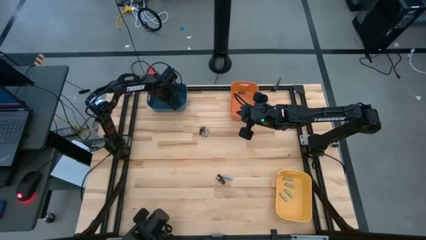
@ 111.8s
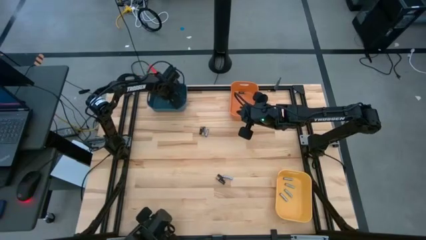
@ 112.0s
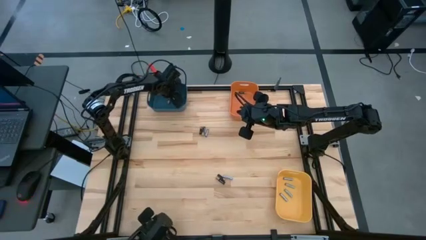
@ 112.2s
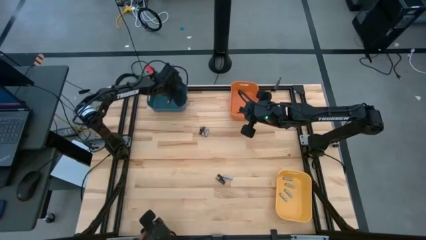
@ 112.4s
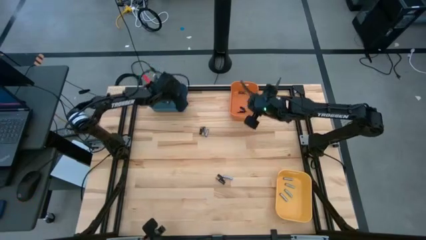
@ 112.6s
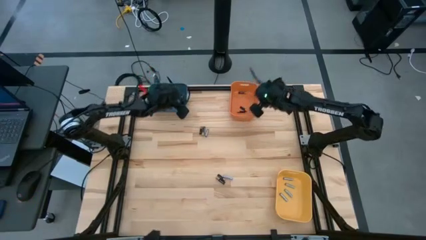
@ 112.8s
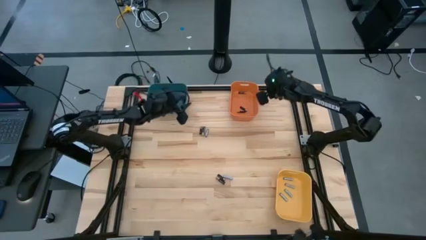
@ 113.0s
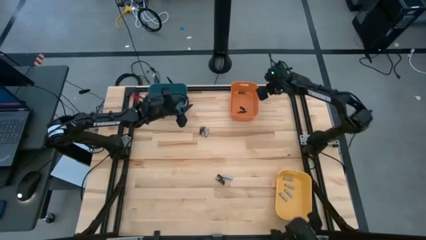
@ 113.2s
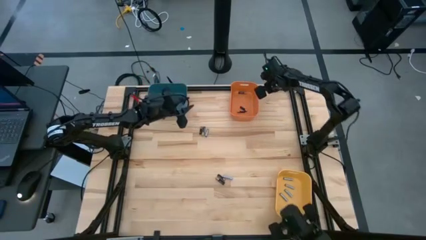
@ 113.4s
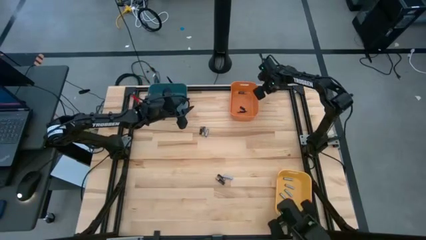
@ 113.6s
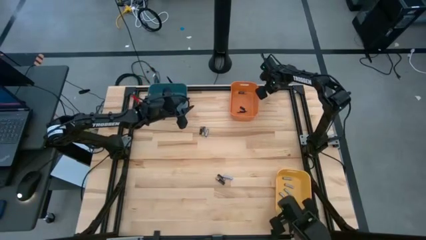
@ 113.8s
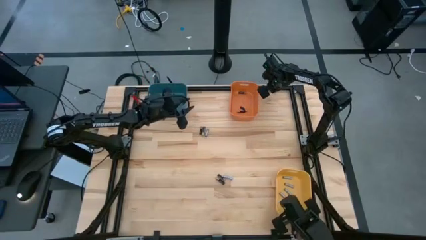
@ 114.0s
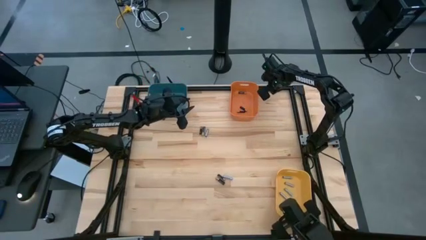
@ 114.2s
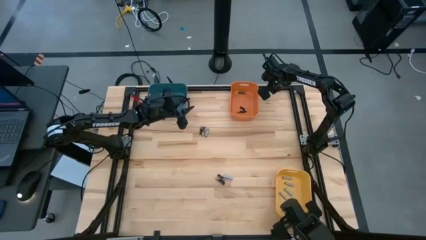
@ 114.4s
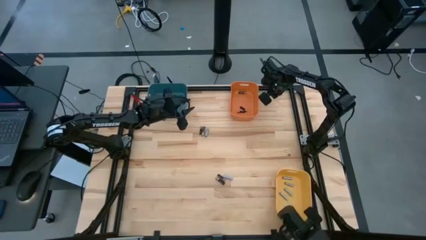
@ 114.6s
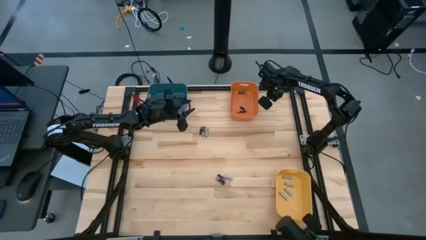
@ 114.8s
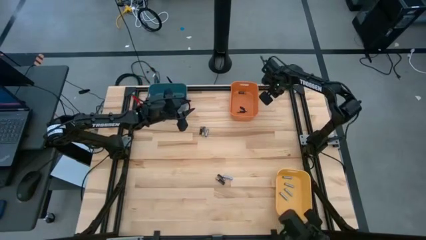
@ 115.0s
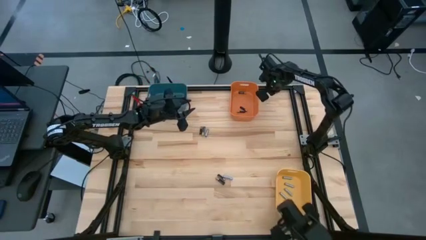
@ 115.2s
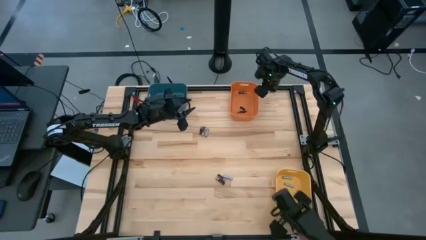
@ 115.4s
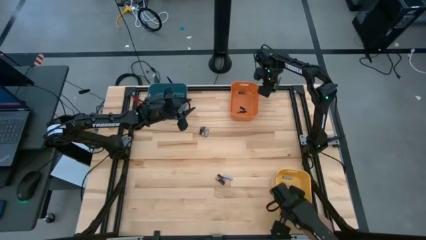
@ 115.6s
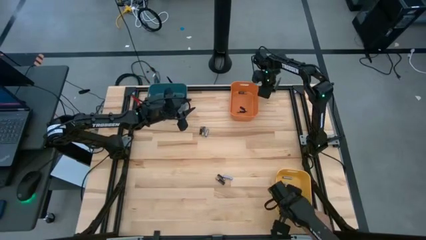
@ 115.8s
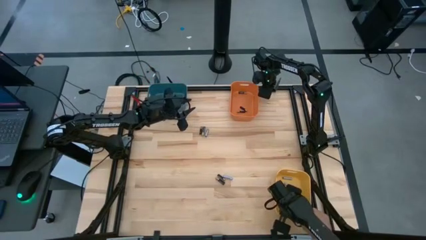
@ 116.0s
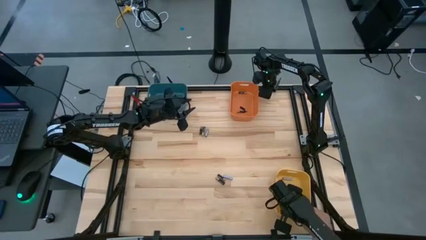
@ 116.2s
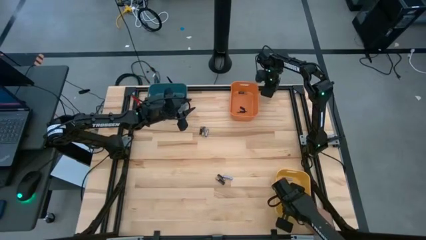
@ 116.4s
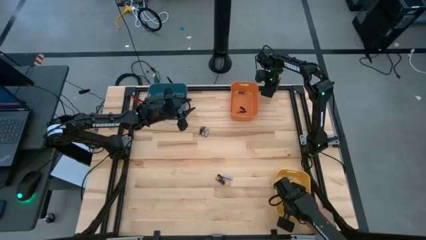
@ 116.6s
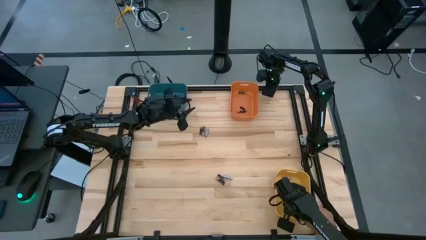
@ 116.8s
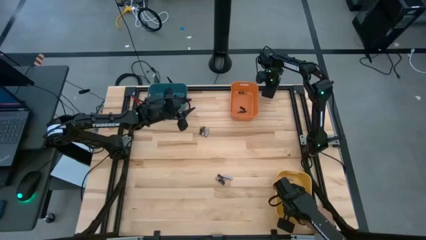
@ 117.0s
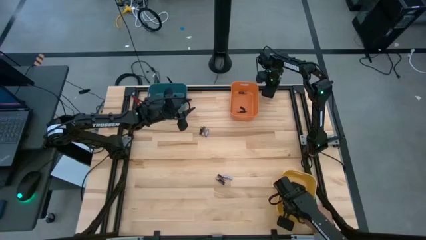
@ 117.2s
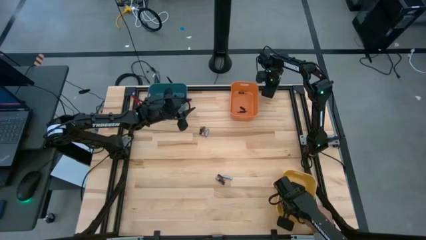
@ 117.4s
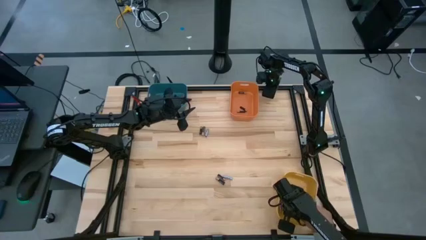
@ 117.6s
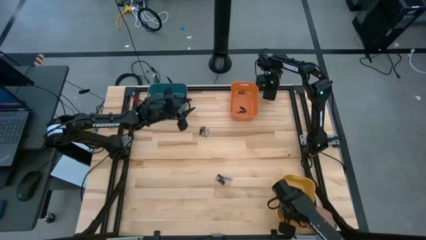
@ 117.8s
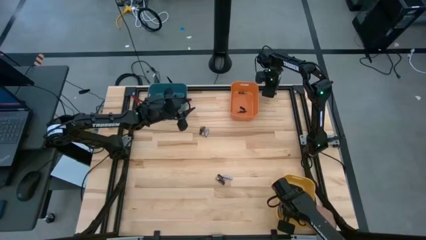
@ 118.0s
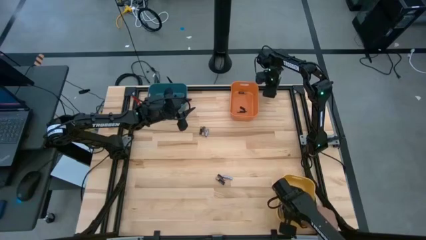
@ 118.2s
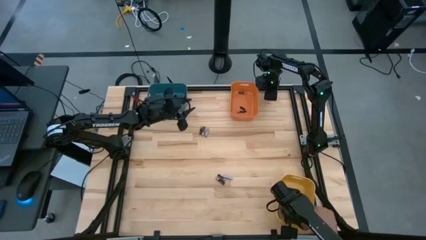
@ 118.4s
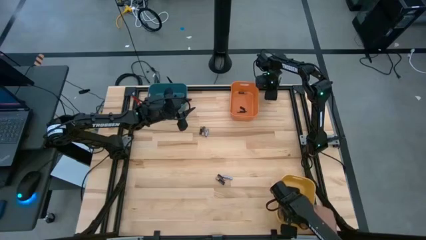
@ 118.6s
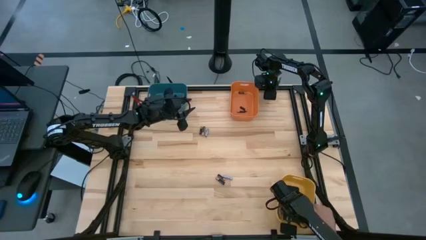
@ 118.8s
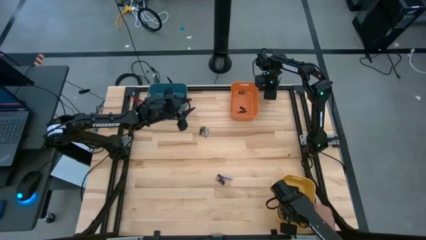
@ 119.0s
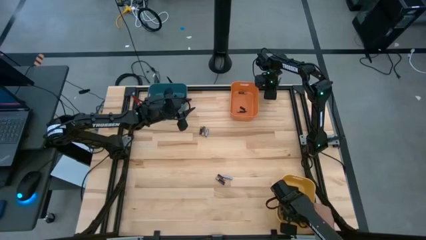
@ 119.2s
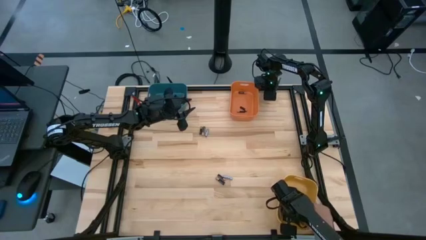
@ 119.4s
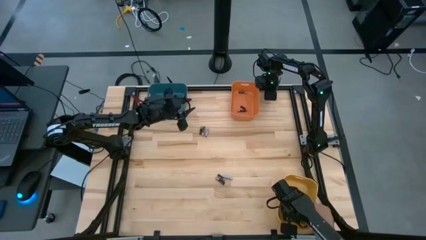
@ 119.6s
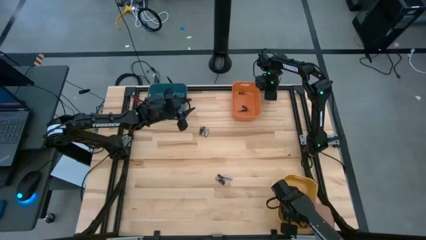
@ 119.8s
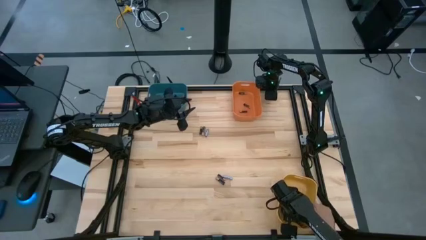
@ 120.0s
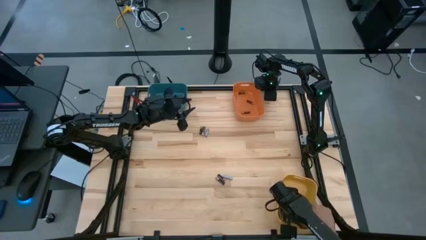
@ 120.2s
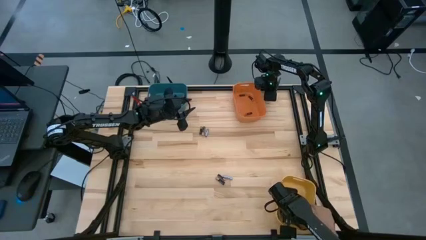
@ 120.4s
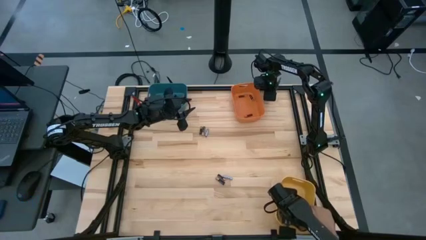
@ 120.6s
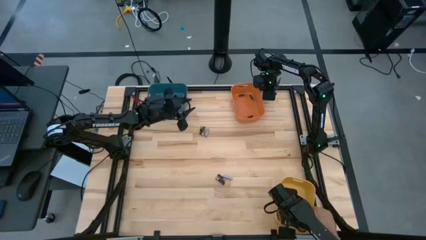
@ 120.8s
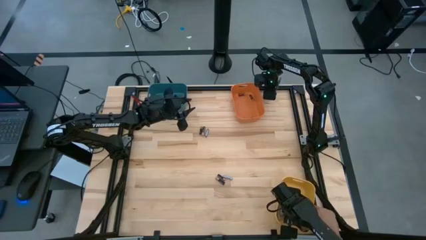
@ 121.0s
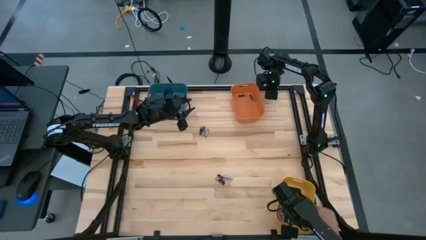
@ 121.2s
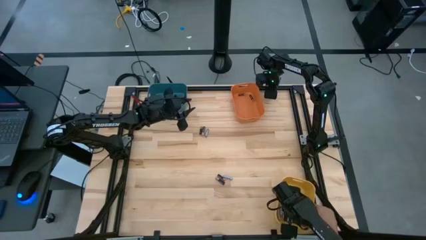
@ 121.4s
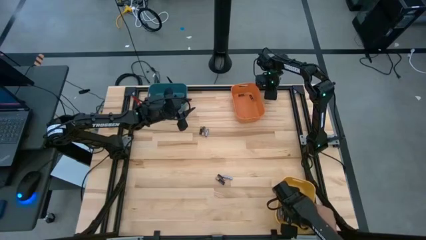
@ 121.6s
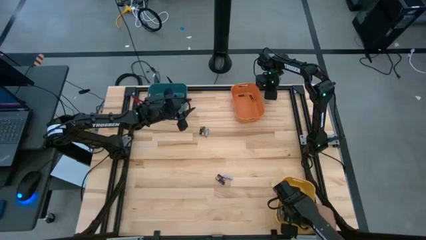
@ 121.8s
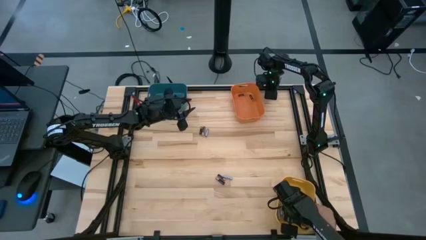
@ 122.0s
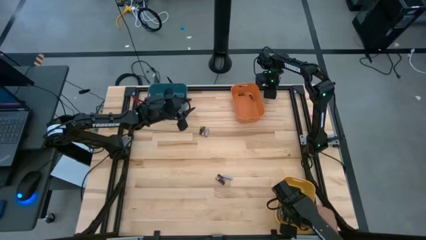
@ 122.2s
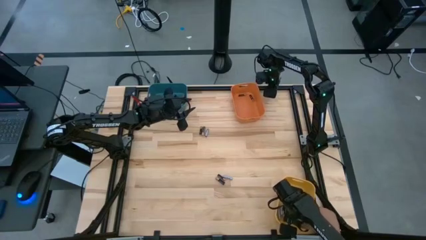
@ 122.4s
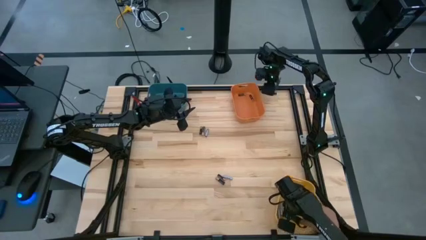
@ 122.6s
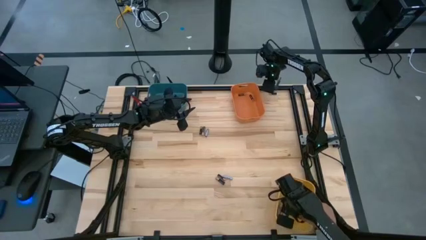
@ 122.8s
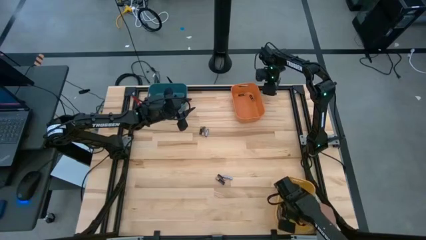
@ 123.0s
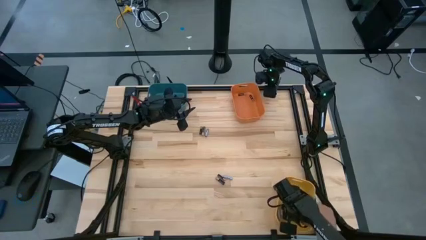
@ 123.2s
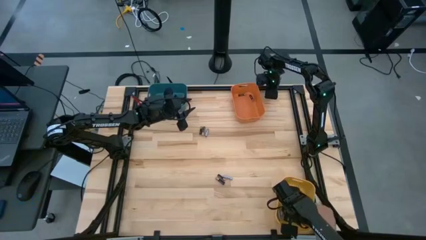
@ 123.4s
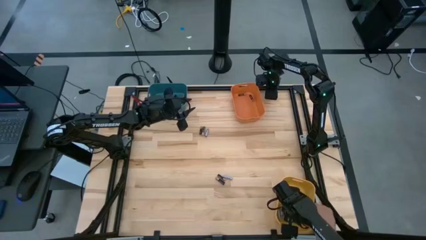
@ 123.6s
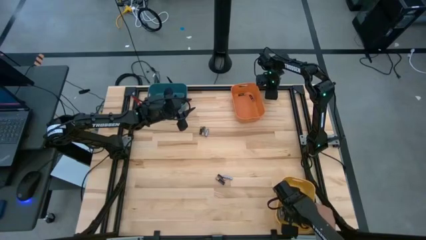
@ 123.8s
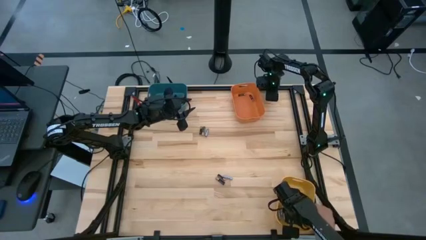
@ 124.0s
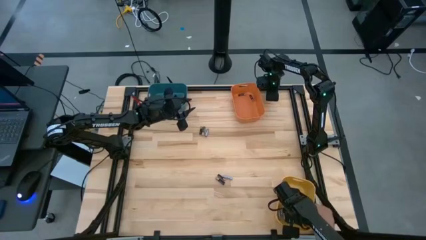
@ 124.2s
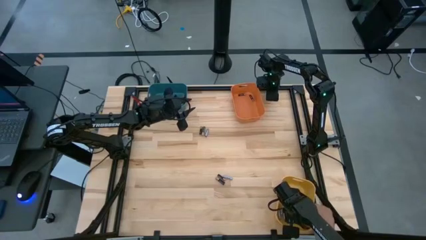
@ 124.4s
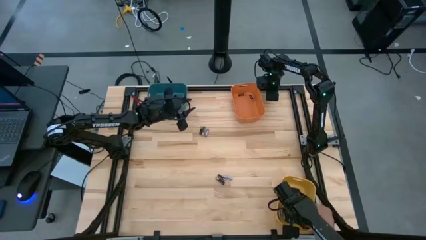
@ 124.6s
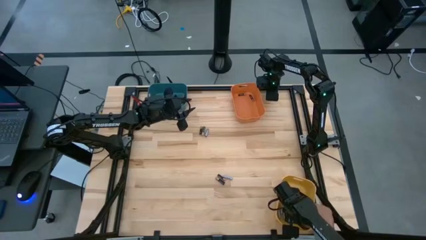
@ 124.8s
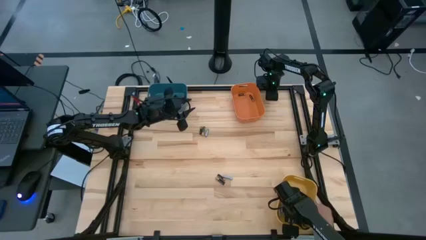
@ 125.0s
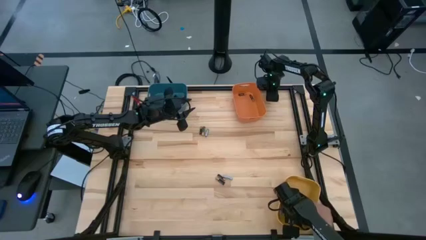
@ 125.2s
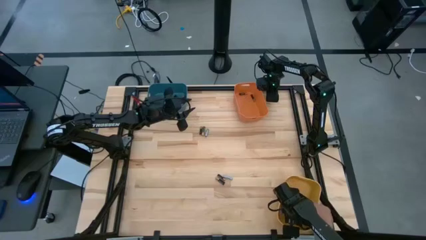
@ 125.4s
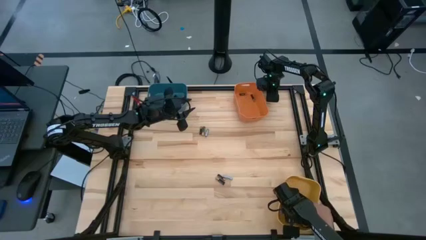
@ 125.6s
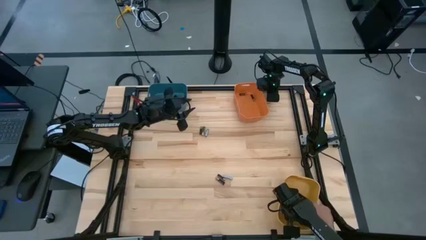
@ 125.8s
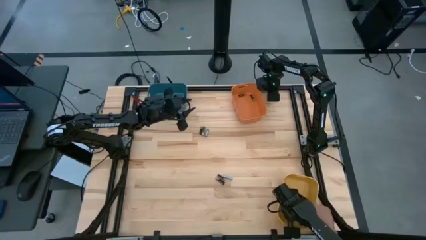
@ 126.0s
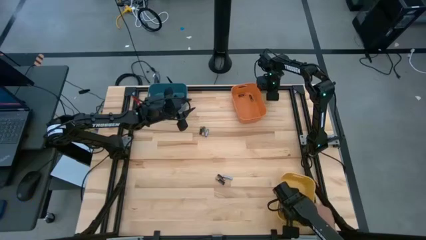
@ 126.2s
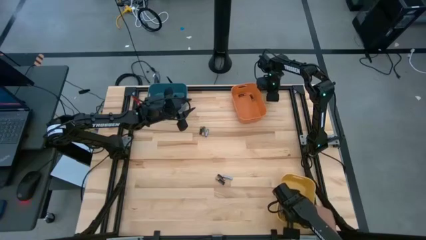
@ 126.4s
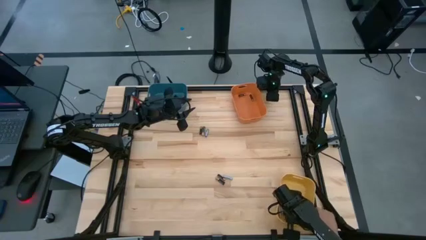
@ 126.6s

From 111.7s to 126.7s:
Task: Sort batteries
Put the small black battery into the orange bin
